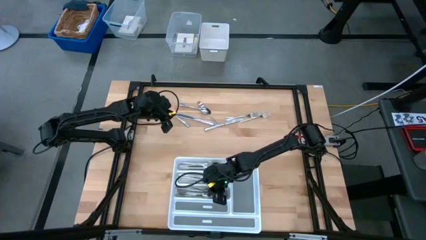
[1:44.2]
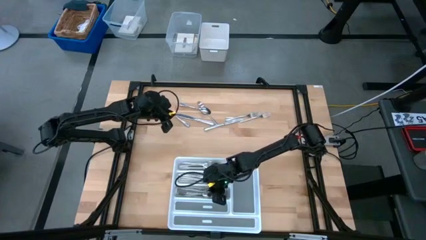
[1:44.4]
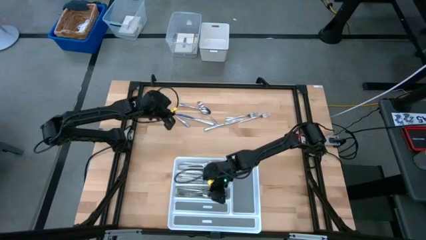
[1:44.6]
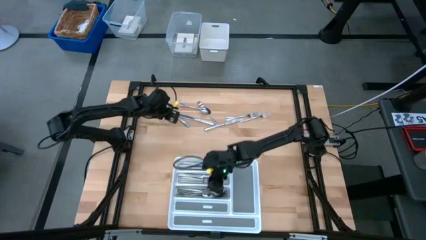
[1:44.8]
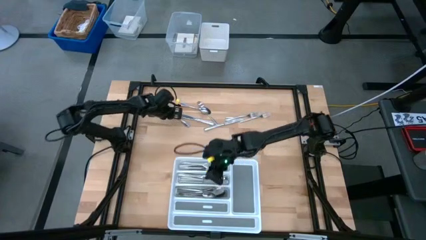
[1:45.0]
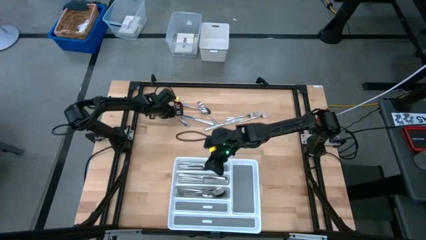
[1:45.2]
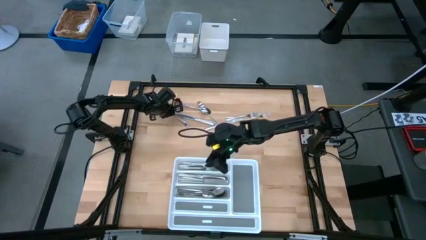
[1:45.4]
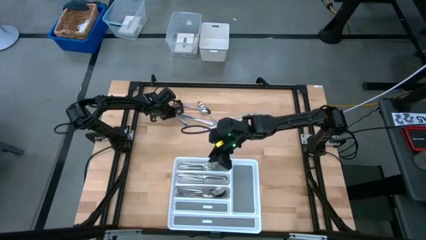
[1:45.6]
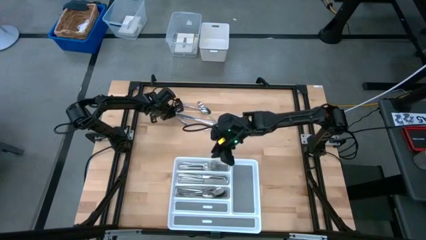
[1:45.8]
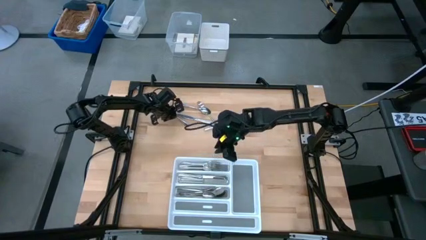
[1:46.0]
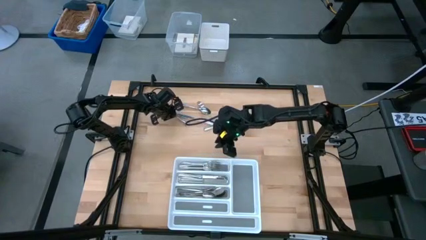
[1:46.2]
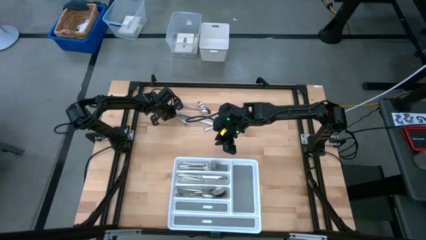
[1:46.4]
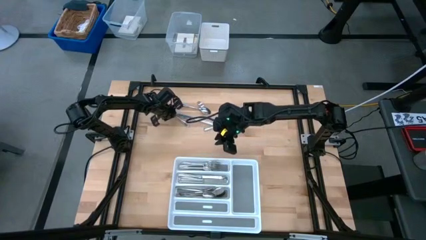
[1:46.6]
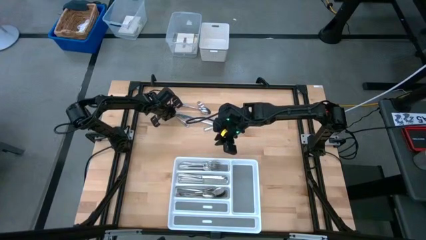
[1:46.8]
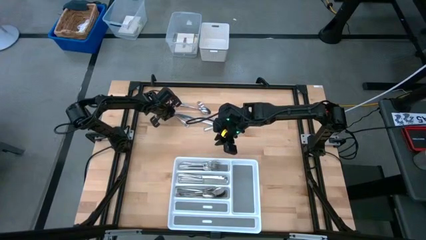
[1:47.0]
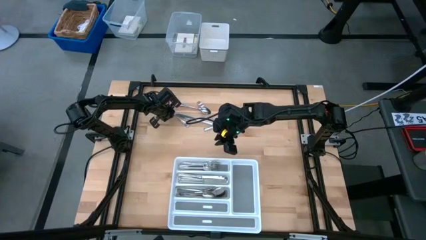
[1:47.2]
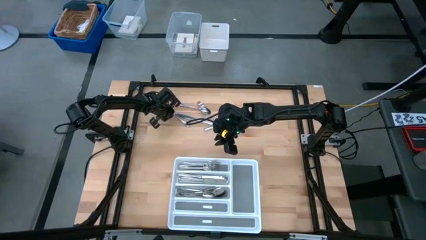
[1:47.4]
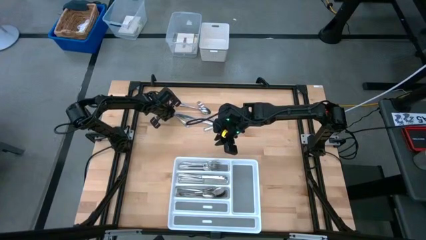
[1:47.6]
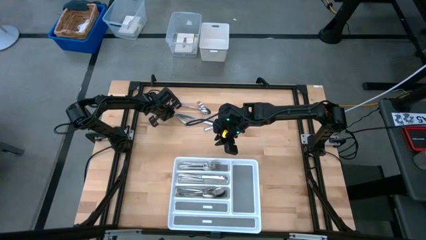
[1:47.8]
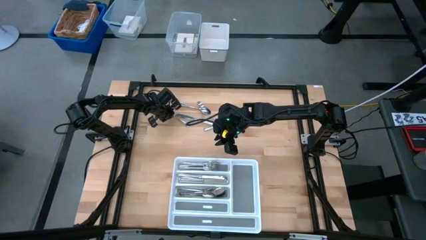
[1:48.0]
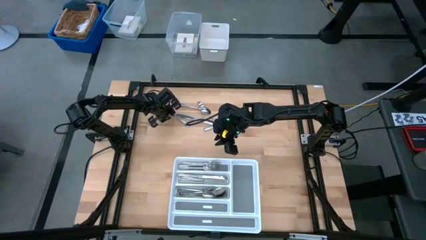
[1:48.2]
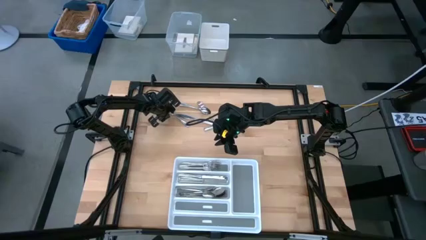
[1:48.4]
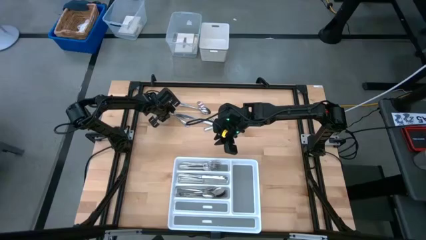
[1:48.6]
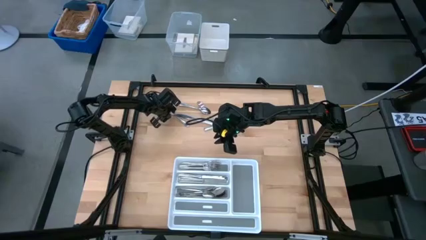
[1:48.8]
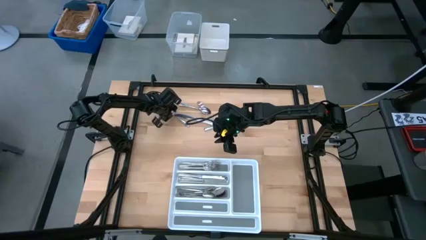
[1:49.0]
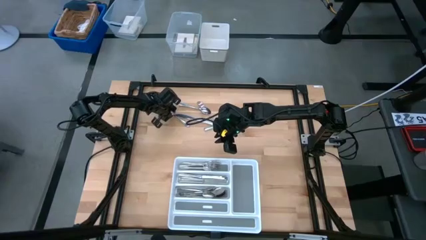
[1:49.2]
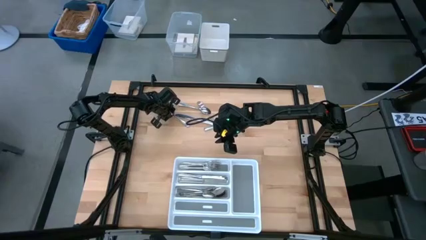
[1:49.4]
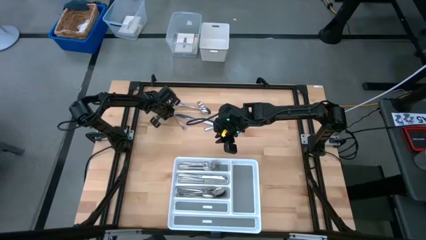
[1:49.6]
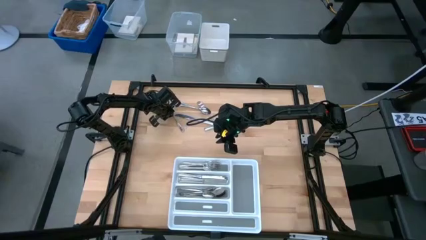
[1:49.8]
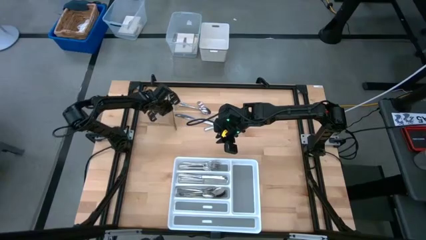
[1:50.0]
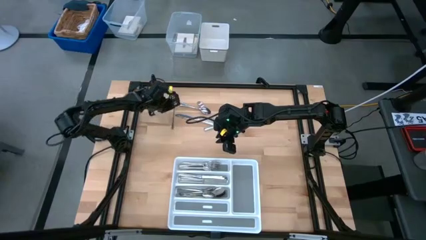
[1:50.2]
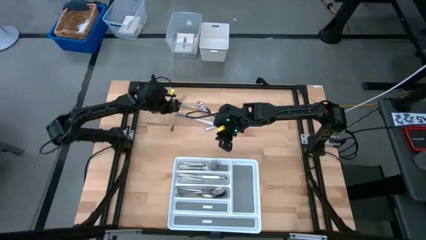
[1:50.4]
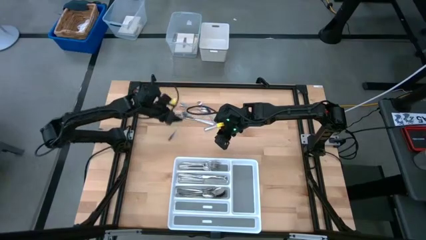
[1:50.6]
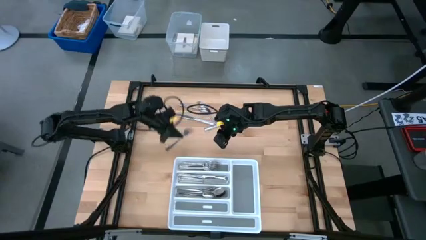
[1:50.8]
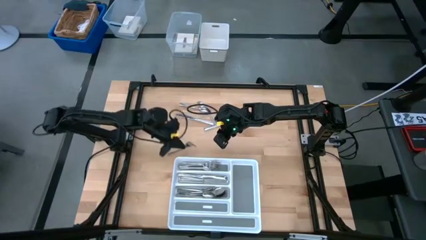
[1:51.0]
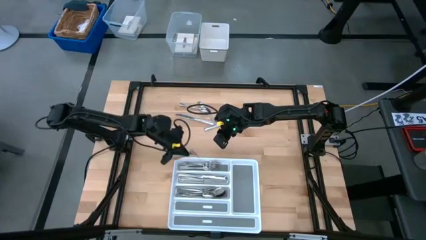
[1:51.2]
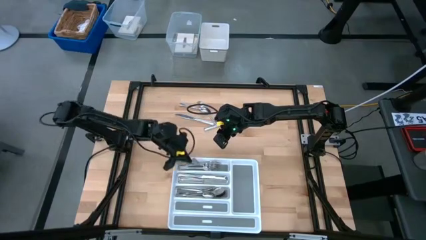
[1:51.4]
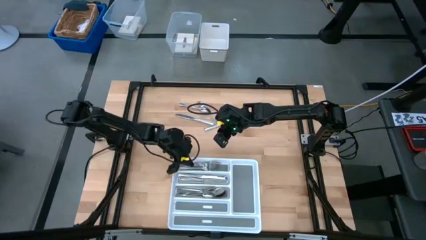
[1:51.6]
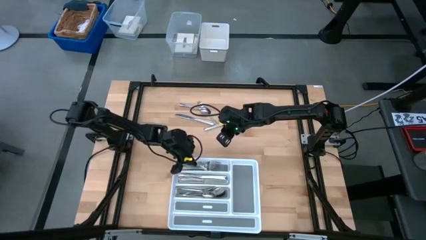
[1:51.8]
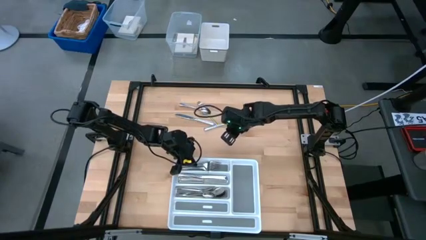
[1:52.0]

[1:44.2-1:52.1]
Task: Sort silverware
Put the silver fork into the top section of the white silverware tray

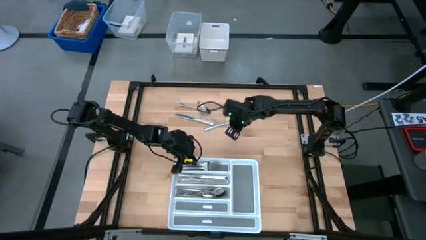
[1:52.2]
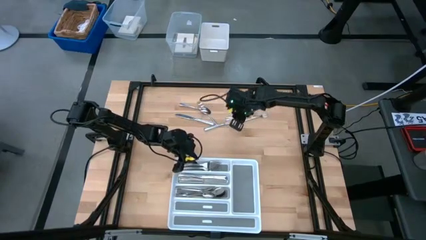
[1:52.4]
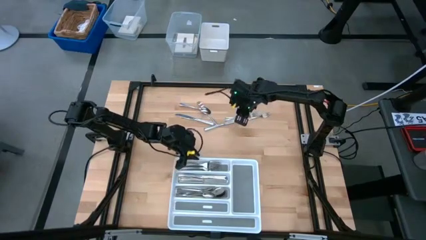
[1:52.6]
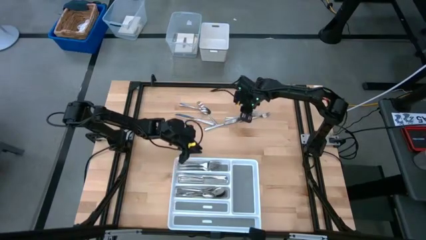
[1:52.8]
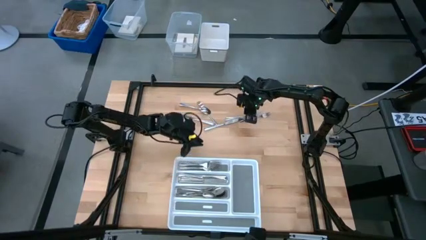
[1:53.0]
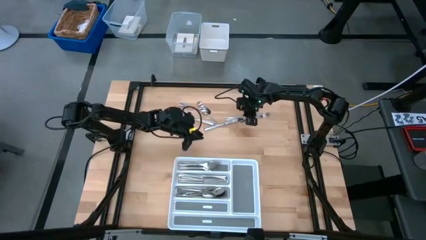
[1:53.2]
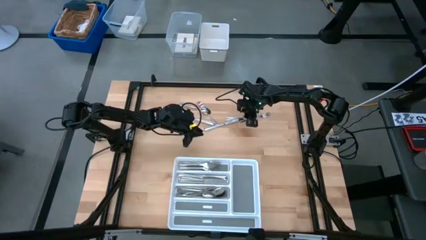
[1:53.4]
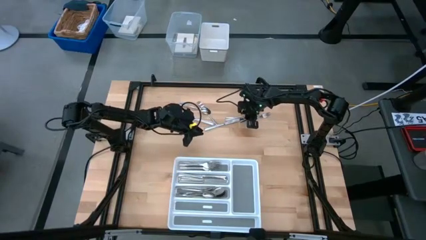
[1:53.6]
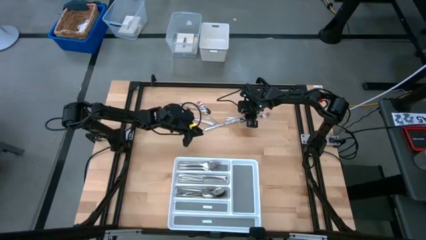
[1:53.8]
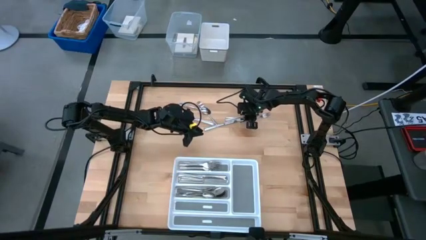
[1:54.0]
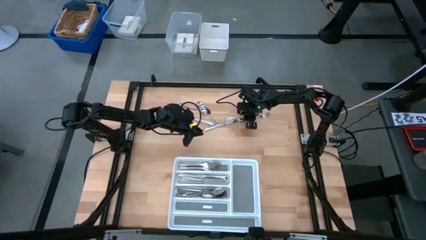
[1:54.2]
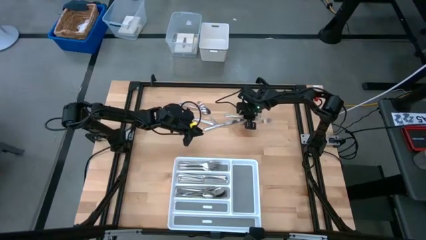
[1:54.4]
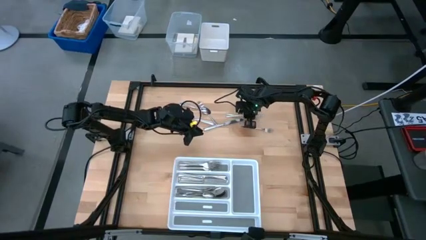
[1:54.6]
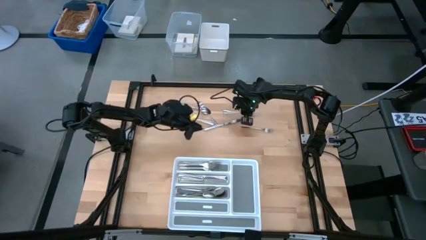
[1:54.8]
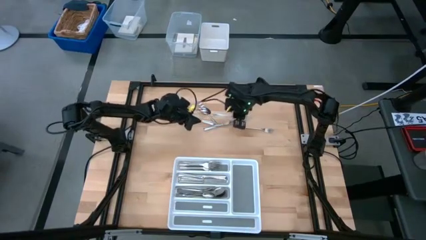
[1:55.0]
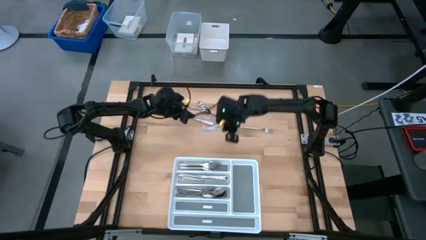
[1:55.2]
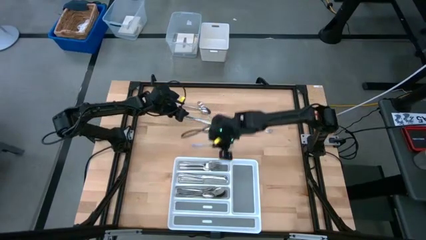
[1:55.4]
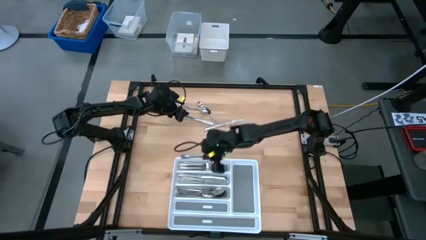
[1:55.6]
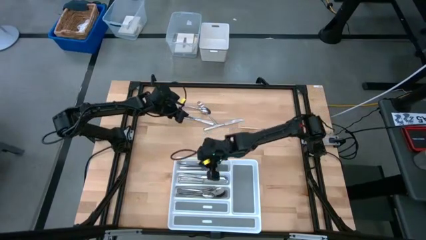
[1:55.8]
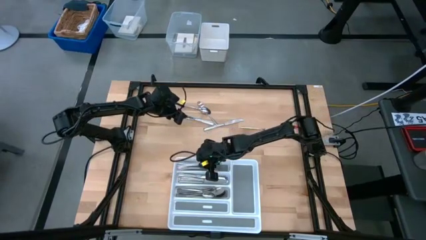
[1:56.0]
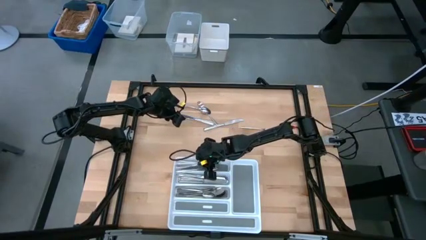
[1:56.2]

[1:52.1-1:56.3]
Put the silver fork into the top section of the white silverware tray

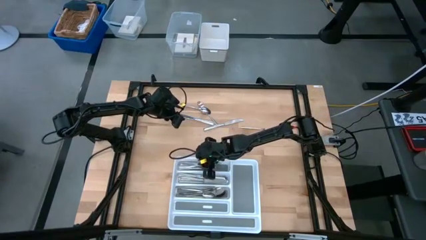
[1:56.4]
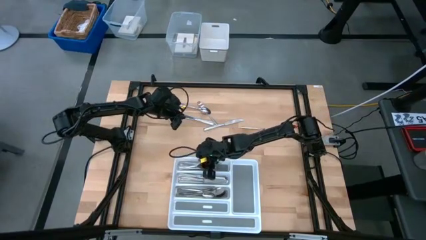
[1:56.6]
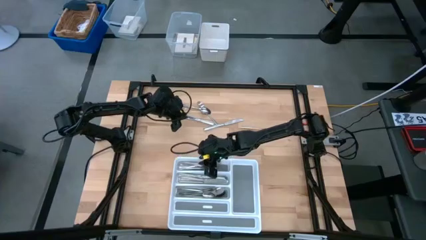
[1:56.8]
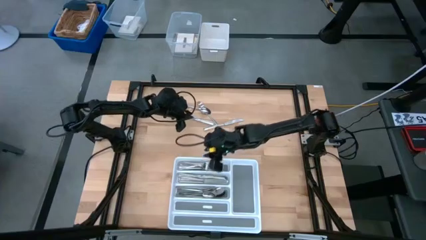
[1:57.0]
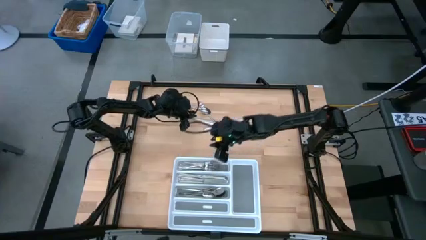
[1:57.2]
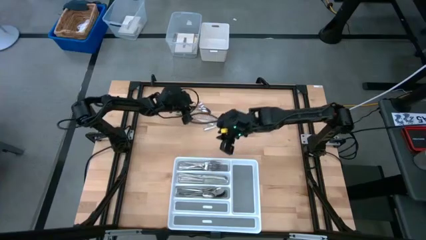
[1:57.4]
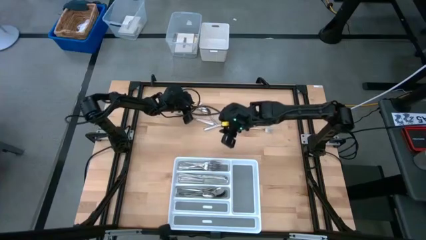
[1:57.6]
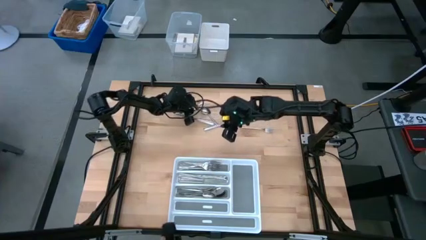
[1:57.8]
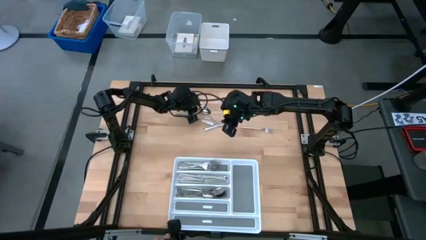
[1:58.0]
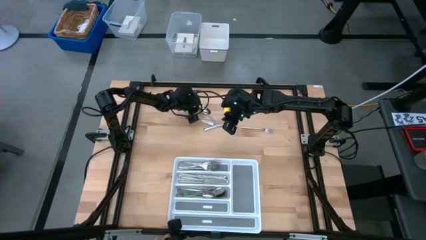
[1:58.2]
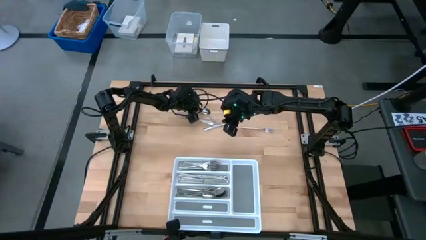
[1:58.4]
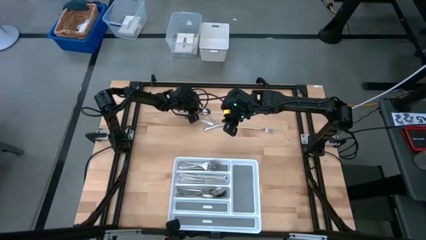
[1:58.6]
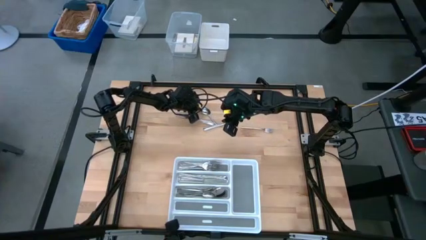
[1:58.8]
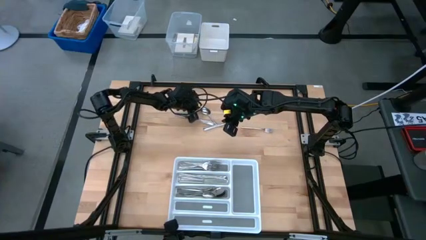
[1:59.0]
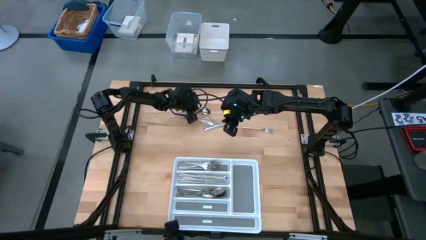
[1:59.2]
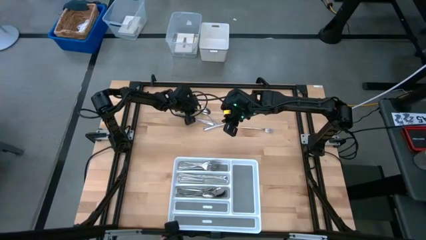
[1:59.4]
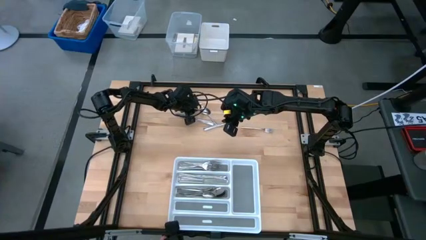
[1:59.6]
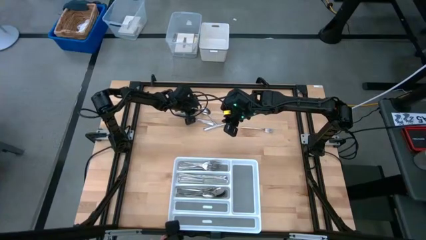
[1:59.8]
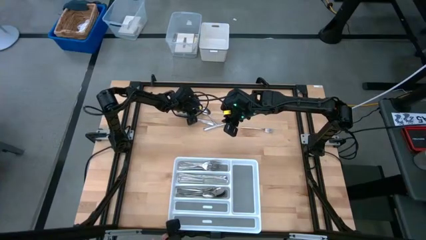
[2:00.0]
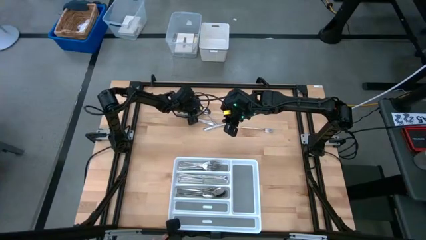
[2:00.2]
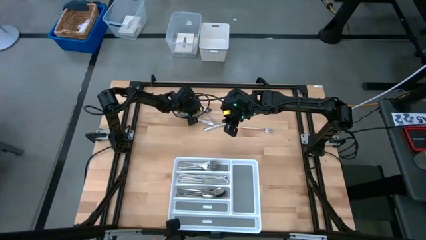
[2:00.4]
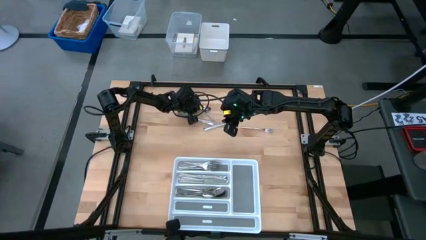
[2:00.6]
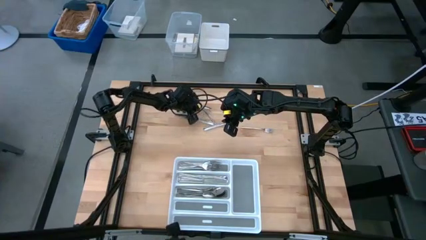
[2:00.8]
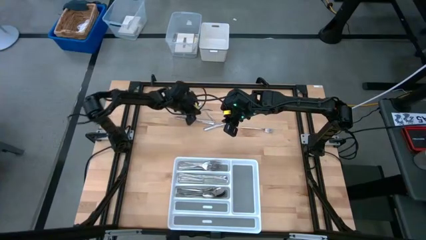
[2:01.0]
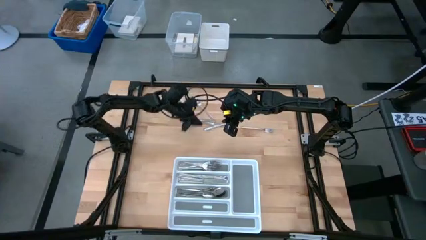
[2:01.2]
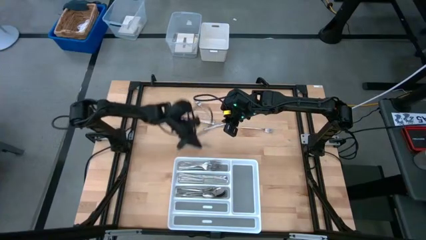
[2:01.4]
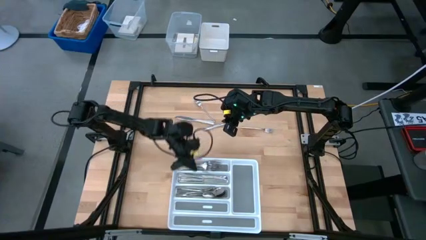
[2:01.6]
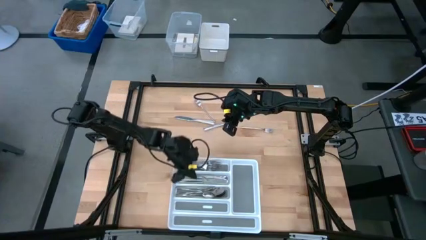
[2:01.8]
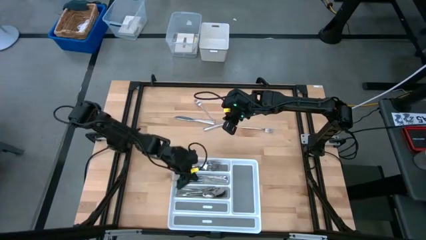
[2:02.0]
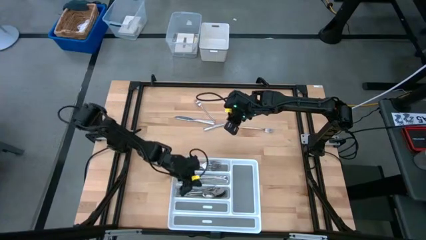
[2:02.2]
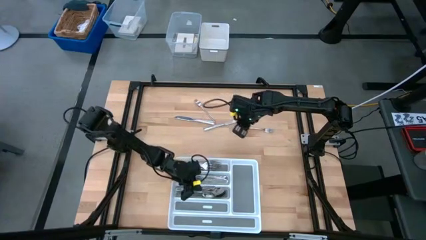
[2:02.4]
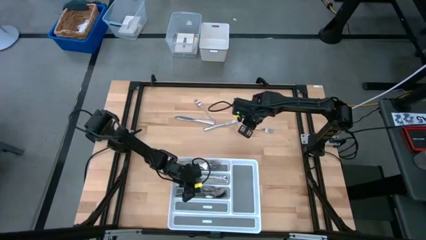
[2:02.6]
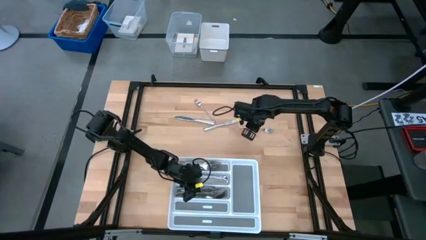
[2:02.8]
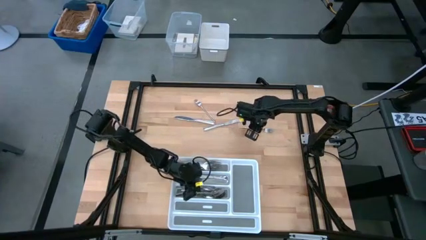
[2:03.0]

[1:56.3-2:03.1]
Put the silver spoon into the bottom section of the white silverware tray
